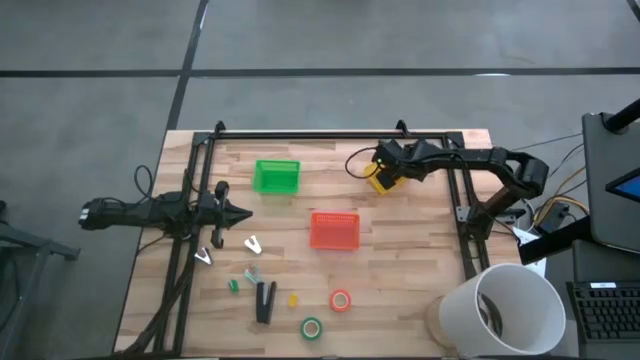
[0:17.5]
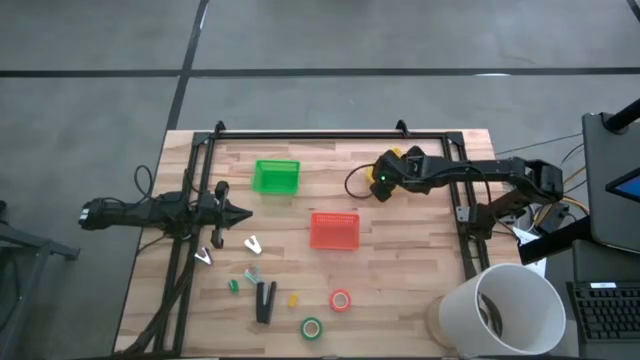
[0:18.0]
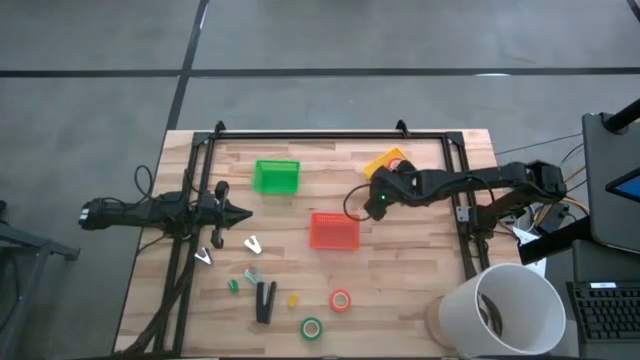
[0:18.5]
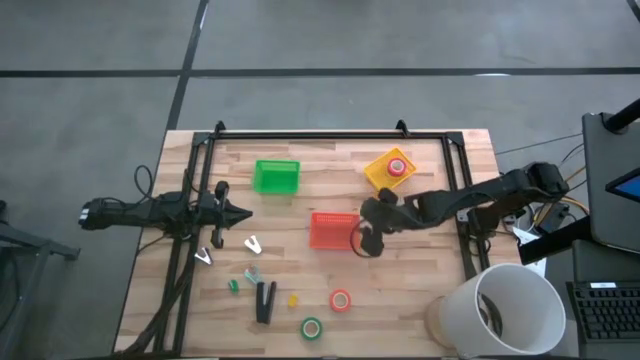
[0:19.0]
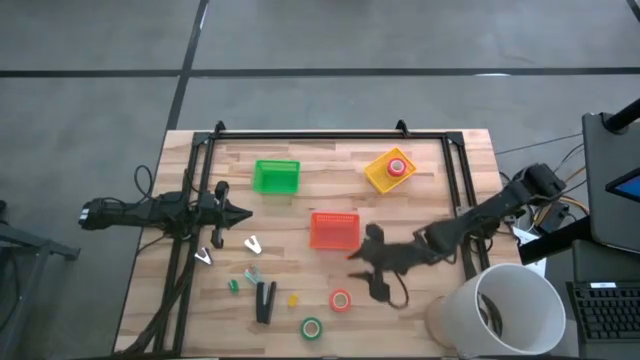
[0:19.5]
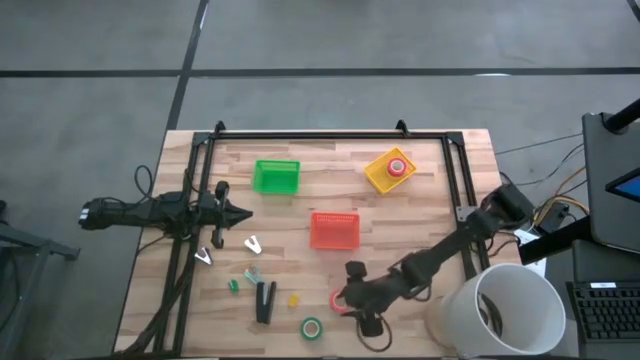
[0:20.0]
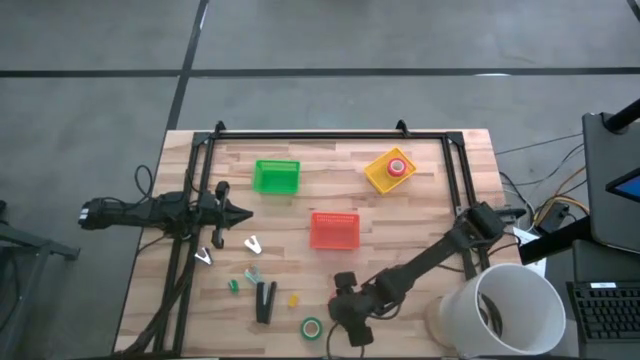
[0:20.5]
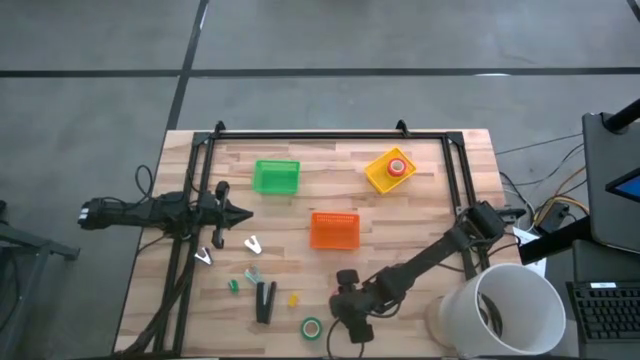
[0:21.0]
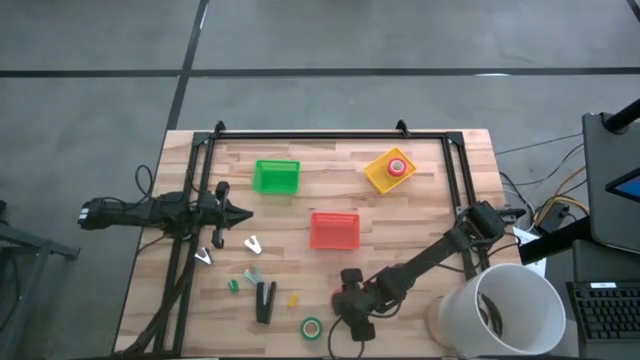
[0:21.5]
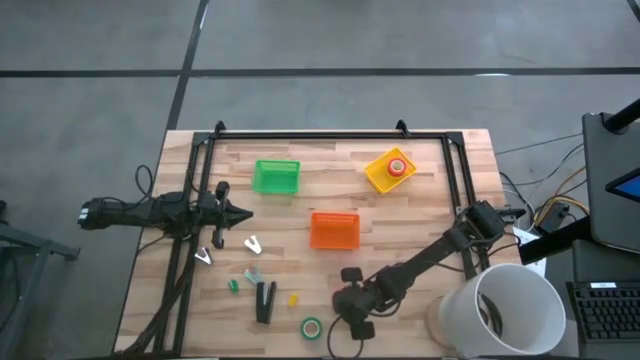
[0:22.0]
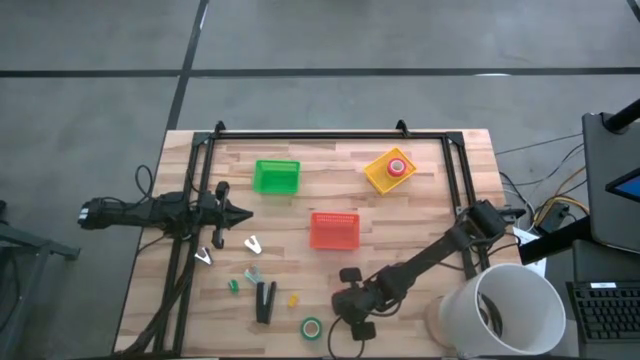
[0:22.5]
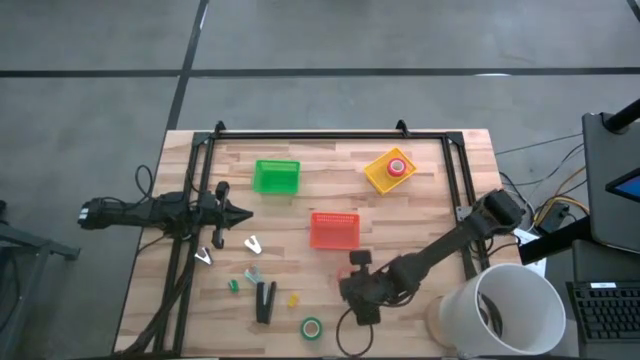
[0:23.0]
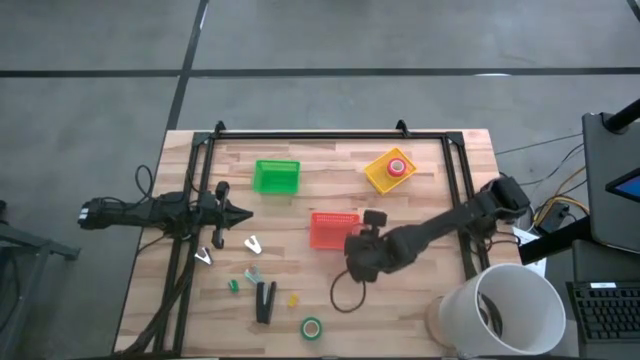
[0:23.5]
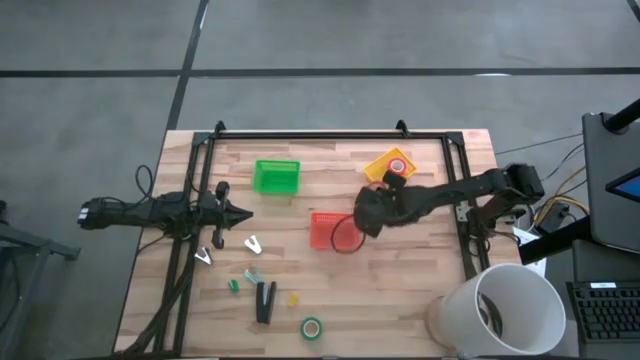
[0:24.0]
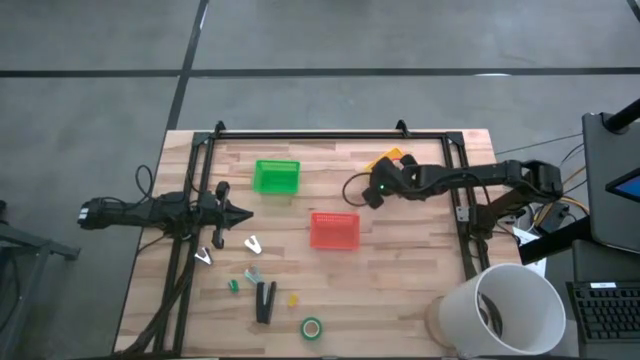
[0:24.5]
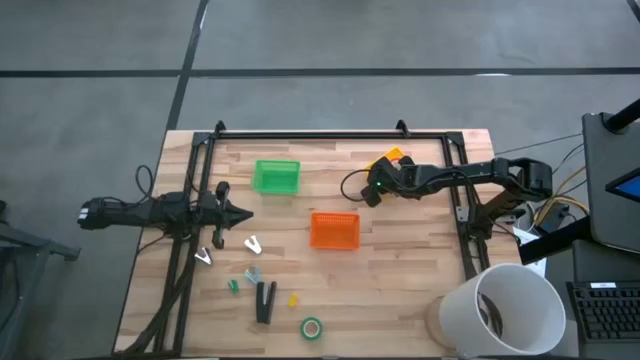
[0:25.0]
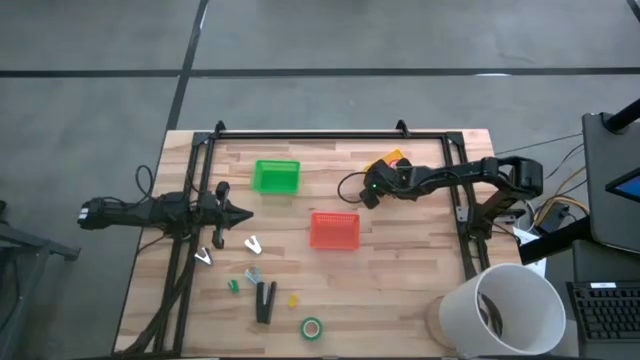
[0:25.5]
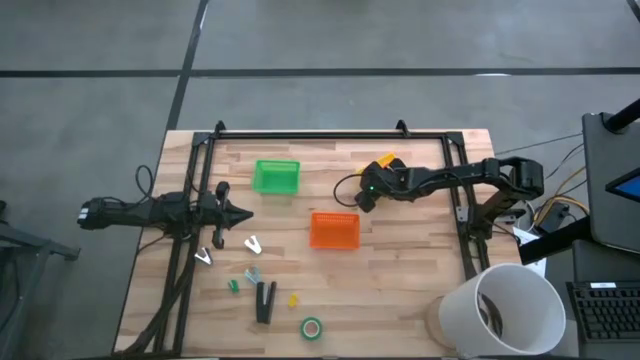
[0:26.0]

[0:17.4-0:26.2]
Task: Pick and place Stapler, Stapler remover, tape
Put the orange tape into the yellow bin

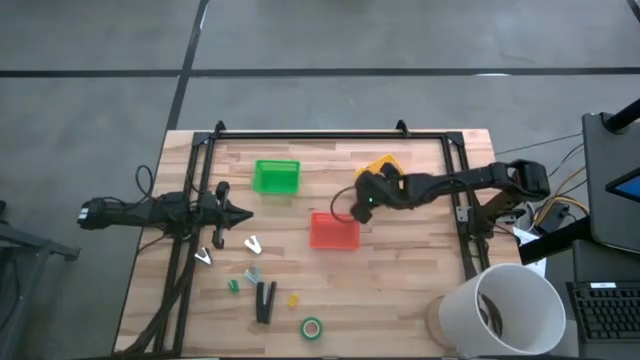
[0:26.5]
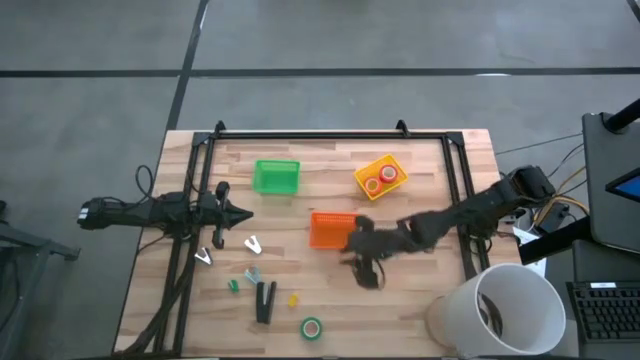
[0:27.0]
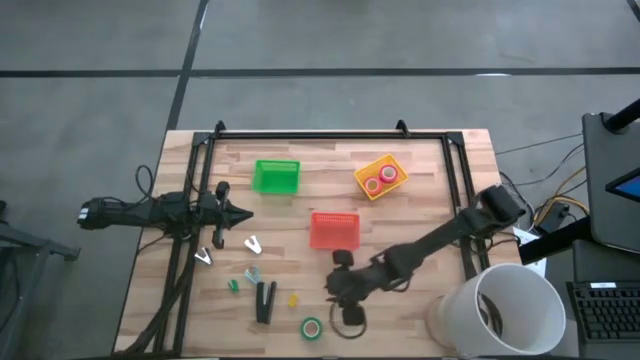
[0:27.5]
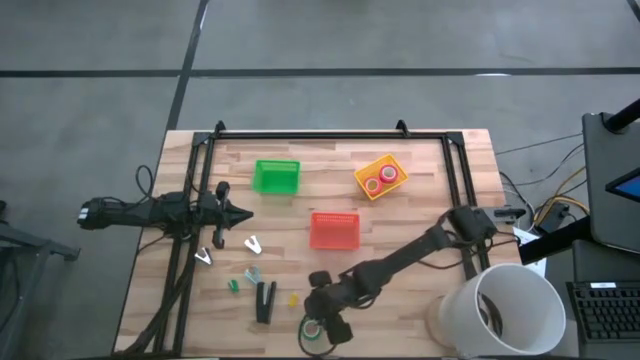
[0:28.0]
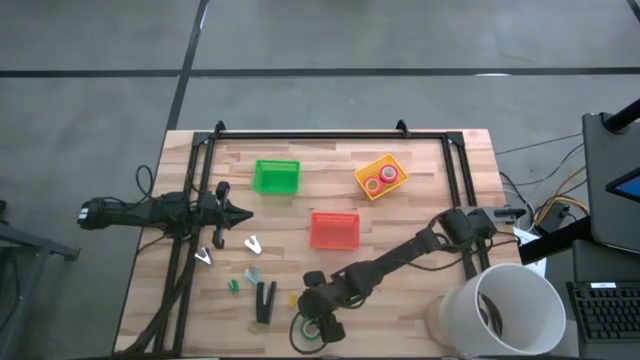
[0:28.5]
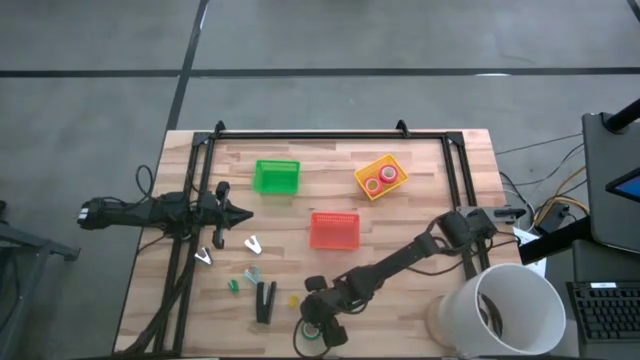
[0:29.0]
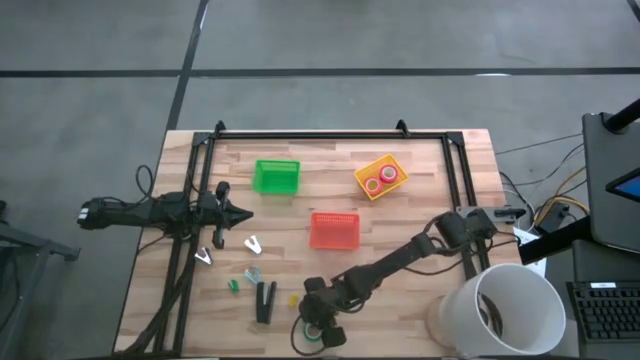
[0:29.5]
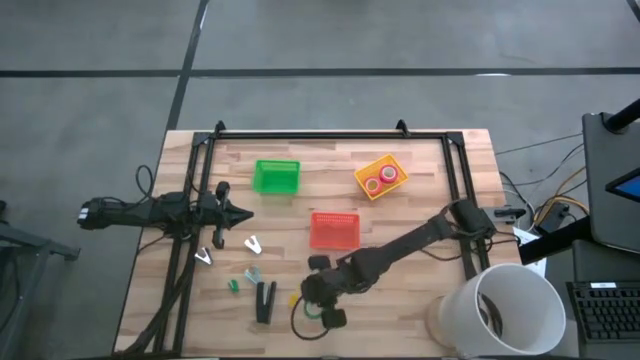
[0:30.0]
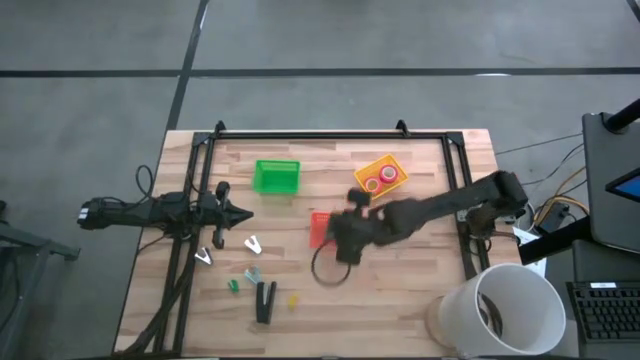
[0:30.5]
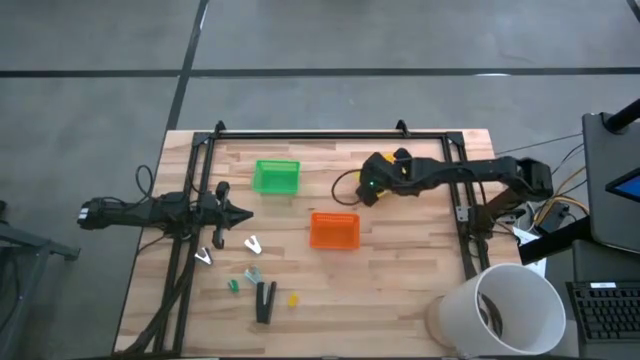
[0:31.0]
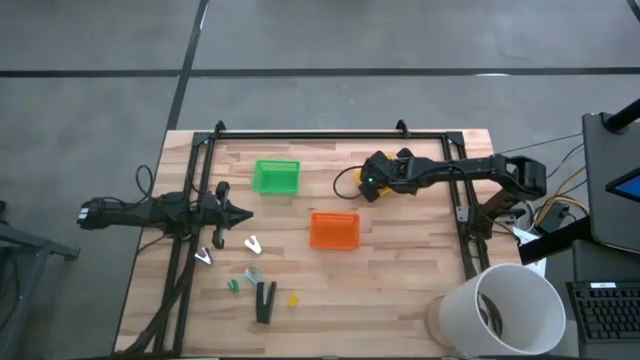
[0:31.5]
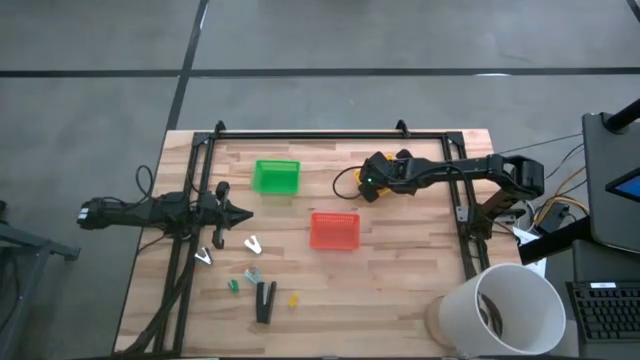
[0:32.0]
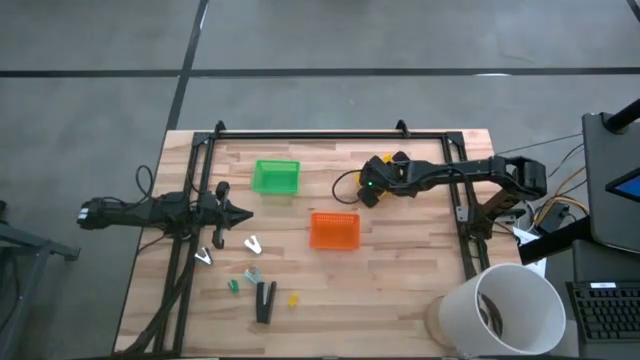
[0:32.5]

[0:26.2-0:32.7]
Put the green tape into the yellow bin

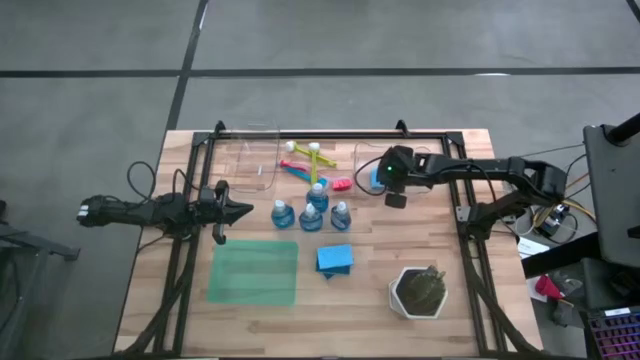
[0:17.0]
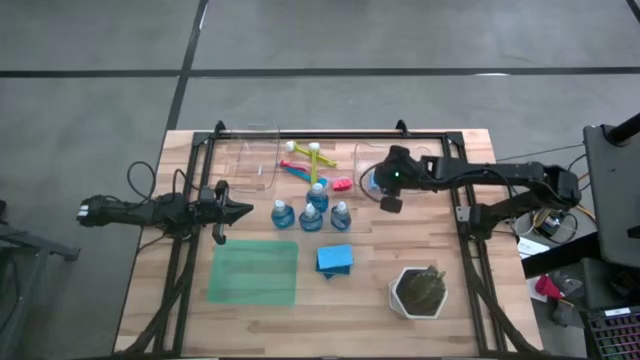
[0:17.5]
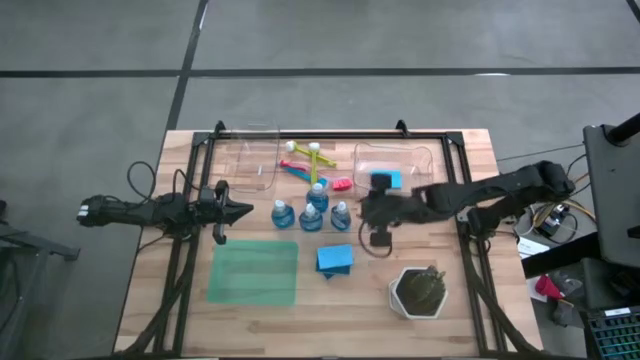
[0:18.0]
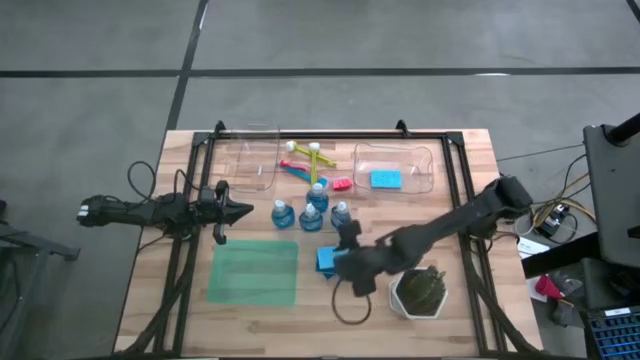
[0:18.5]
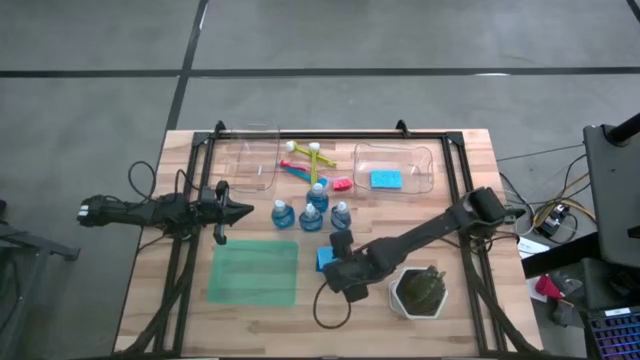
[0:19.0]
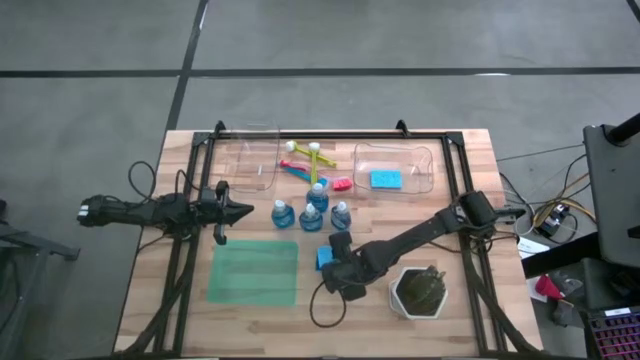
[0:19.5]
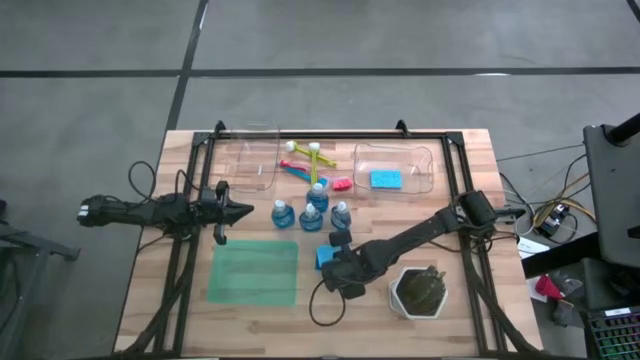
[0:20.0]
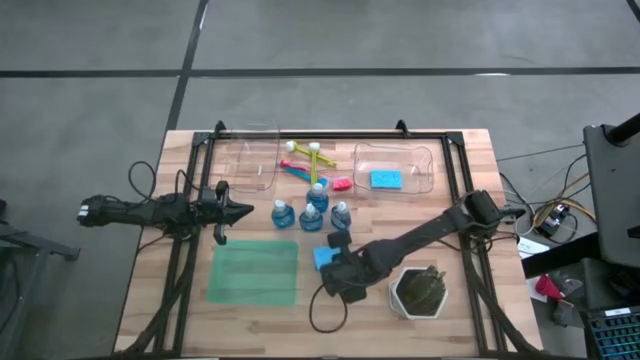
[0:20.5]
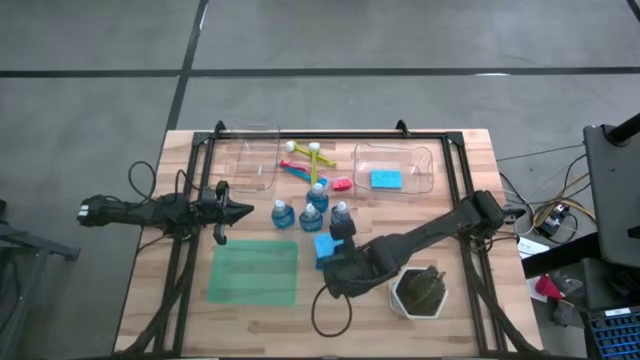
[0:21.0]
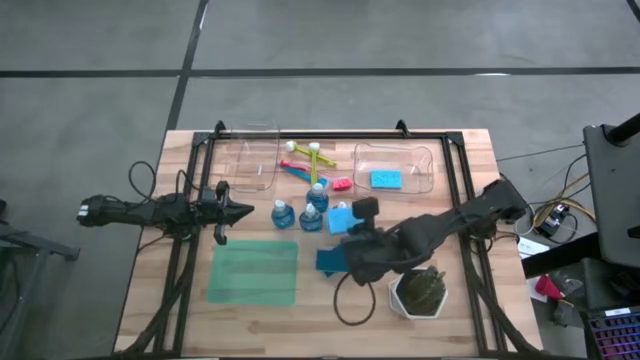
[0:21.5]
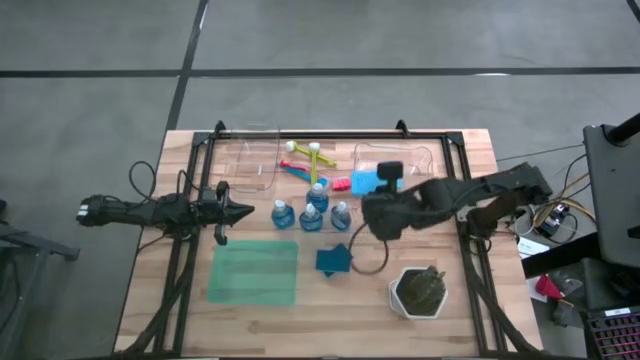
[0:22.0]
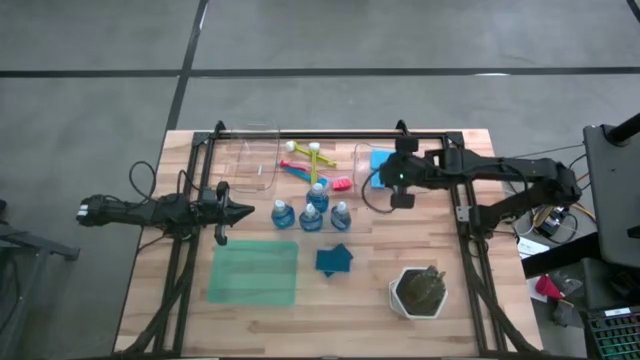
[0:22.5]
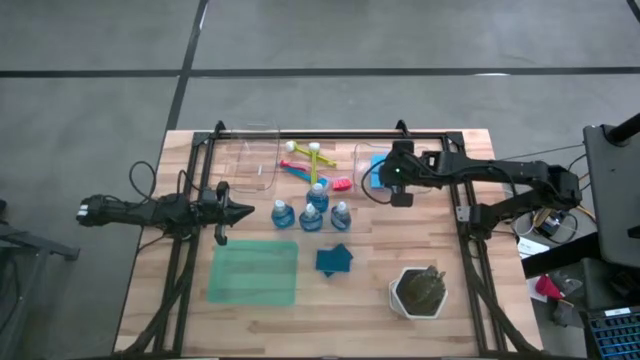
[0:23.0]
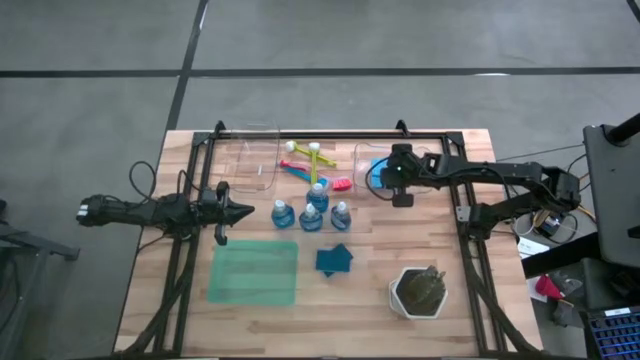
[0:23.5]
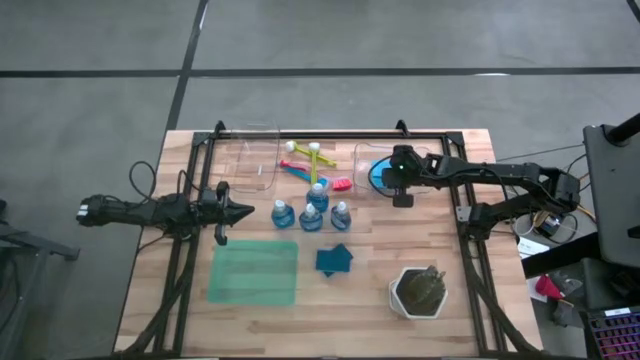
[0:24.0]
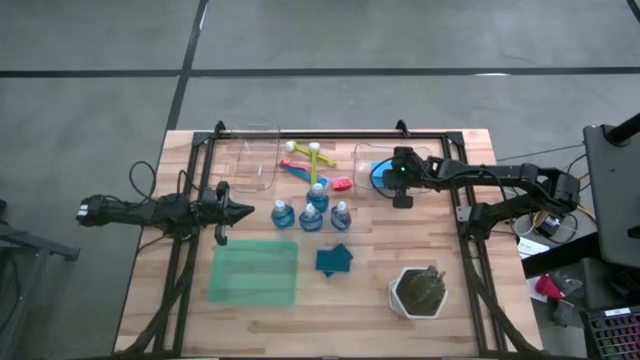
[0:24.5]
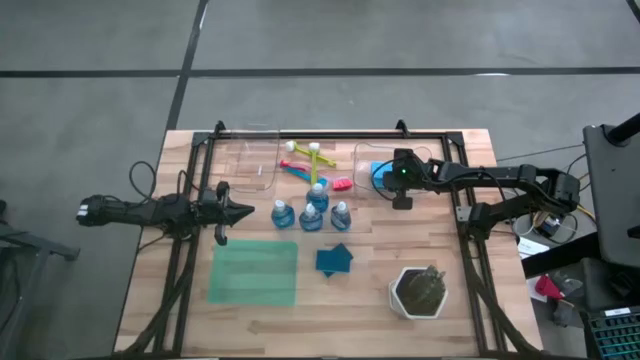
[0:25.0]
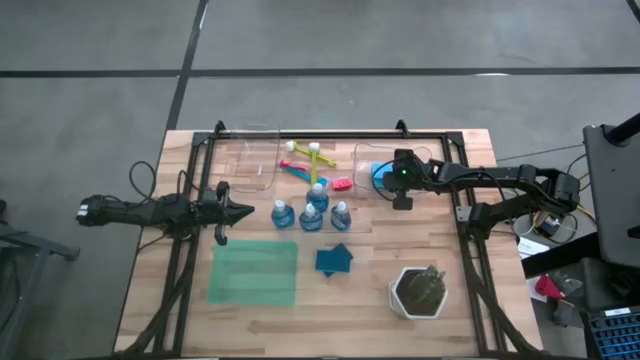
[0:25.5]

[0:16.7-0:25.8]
Task: Pick & Place Kitchen Sink Supplies
Put the blue sponge into the right transparent bin
